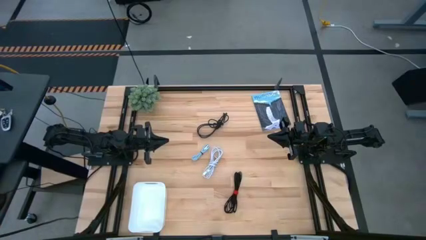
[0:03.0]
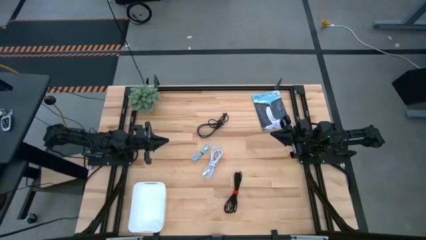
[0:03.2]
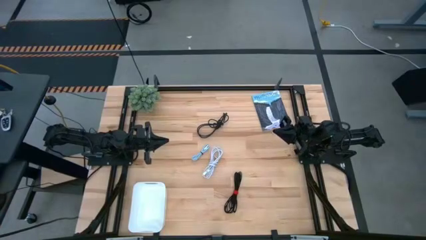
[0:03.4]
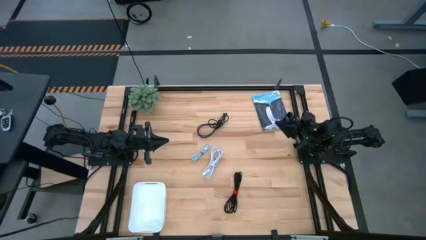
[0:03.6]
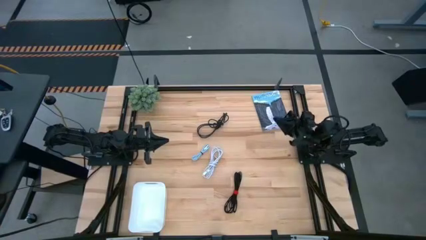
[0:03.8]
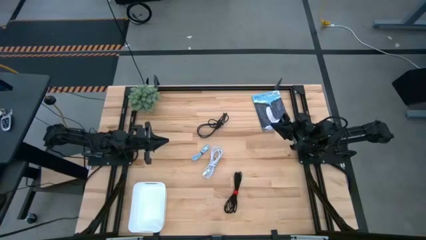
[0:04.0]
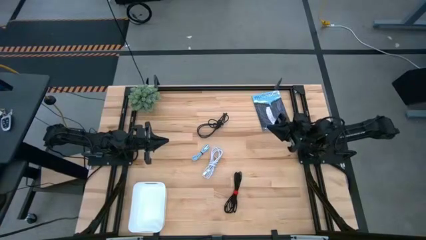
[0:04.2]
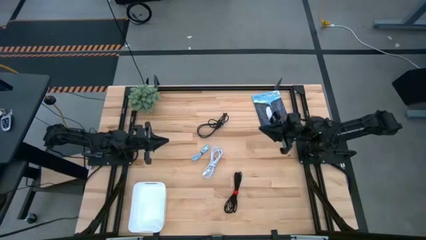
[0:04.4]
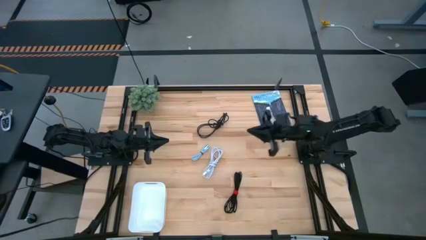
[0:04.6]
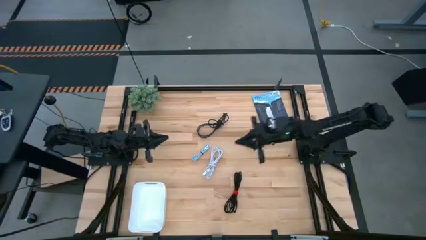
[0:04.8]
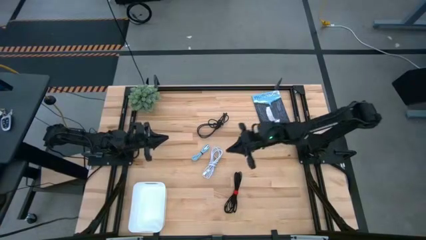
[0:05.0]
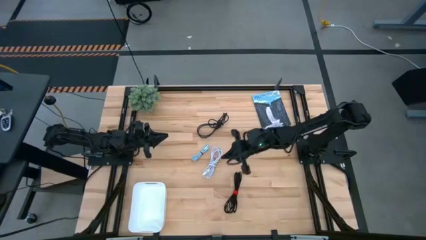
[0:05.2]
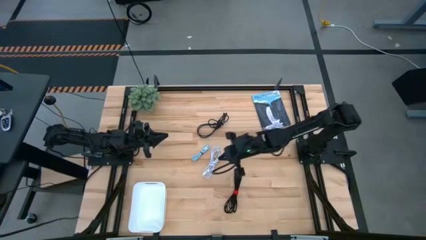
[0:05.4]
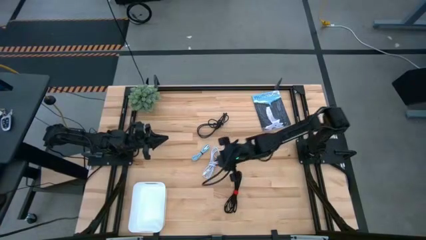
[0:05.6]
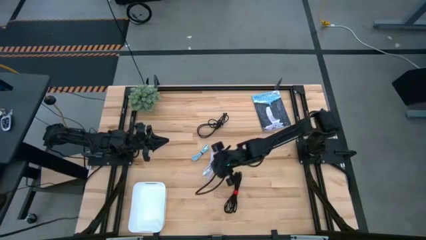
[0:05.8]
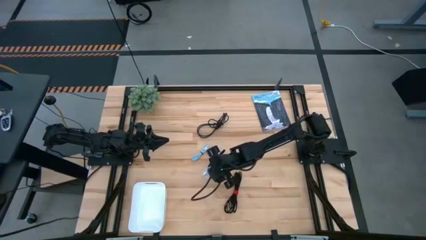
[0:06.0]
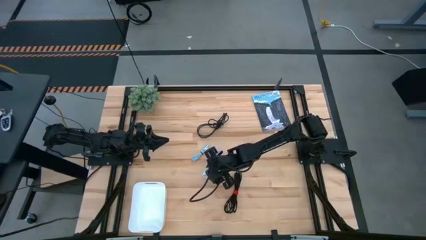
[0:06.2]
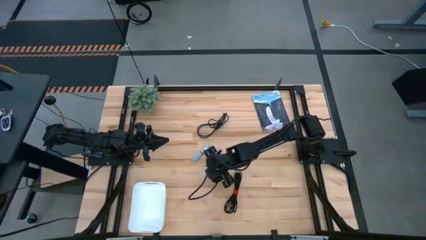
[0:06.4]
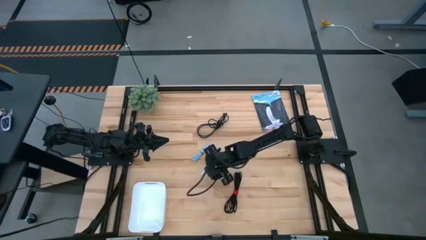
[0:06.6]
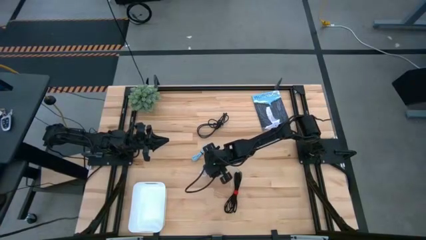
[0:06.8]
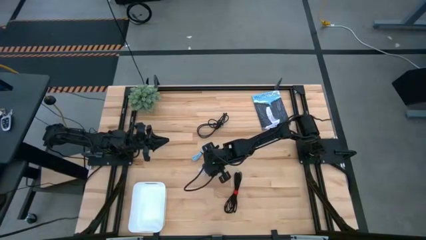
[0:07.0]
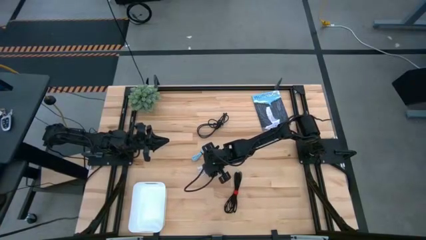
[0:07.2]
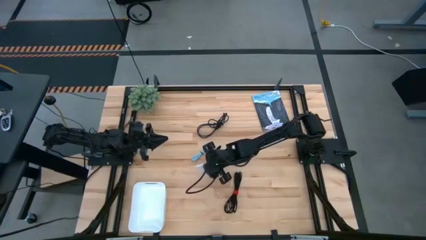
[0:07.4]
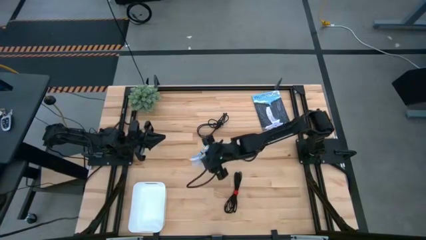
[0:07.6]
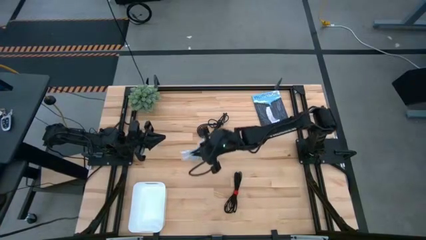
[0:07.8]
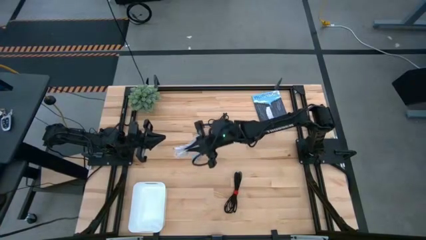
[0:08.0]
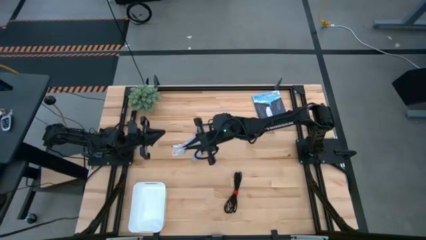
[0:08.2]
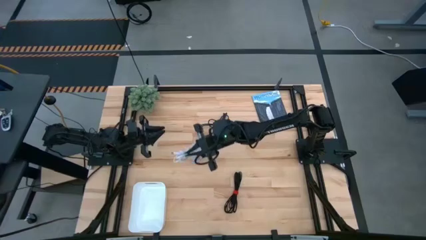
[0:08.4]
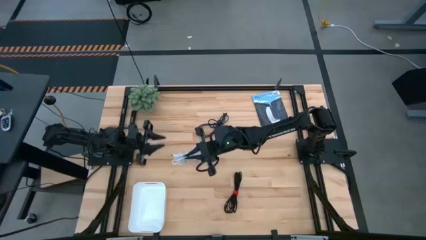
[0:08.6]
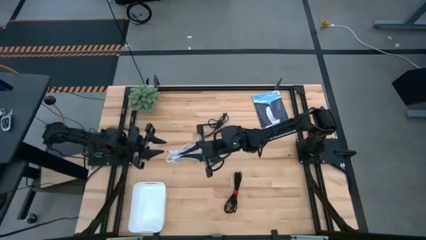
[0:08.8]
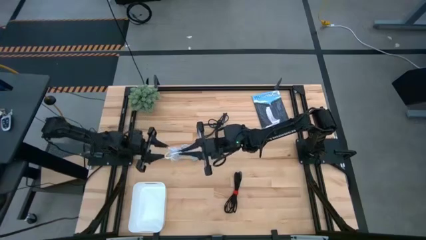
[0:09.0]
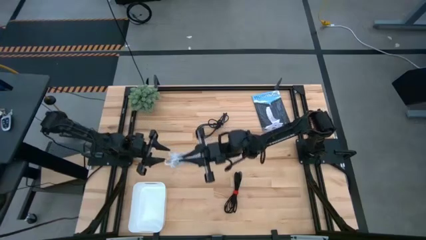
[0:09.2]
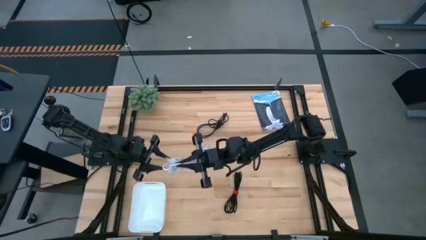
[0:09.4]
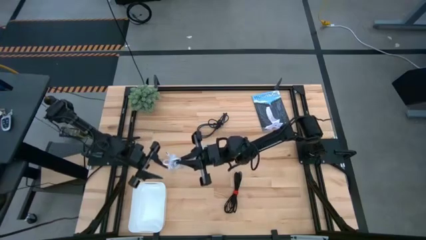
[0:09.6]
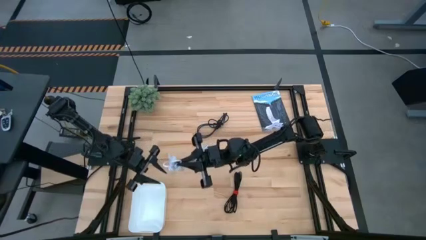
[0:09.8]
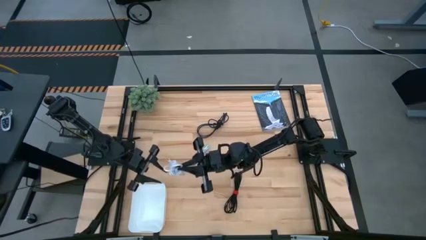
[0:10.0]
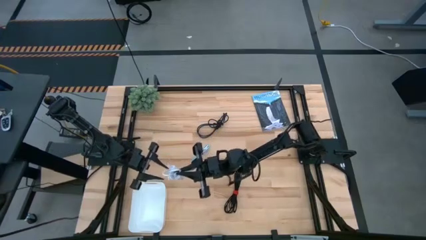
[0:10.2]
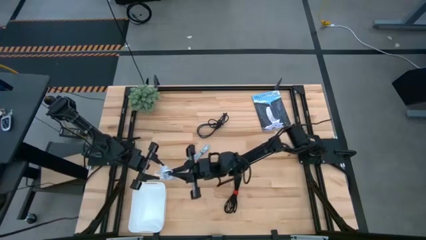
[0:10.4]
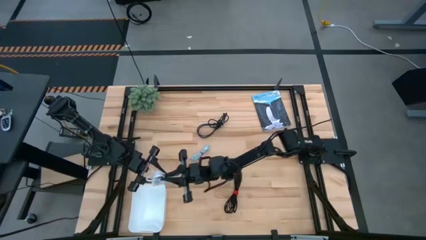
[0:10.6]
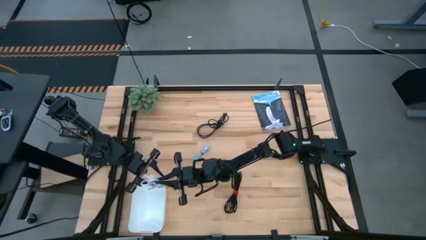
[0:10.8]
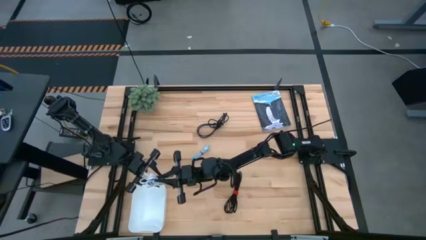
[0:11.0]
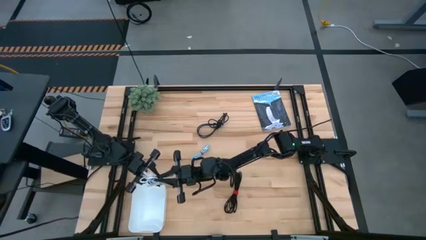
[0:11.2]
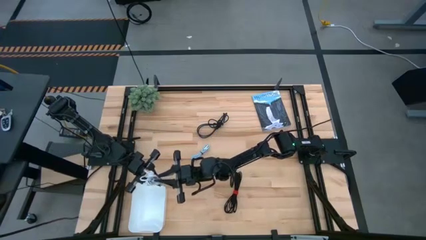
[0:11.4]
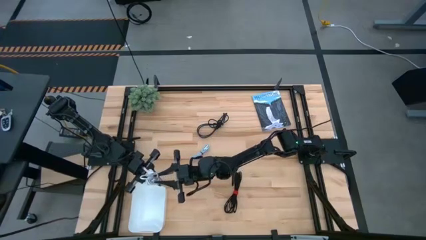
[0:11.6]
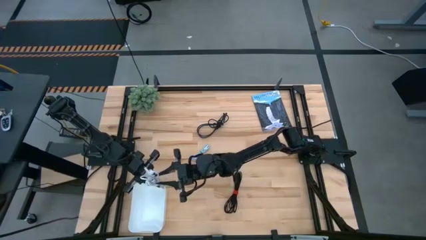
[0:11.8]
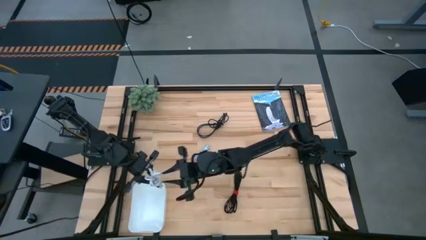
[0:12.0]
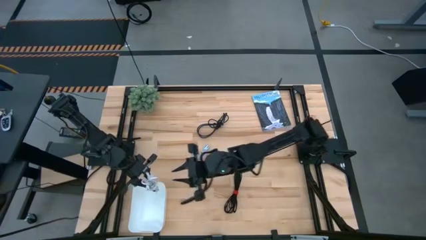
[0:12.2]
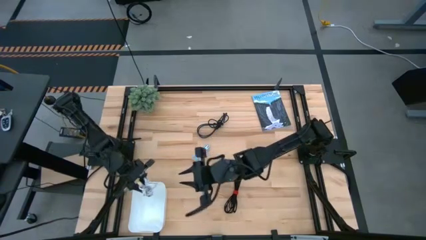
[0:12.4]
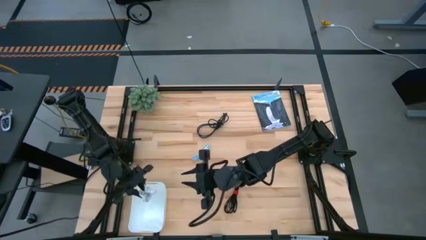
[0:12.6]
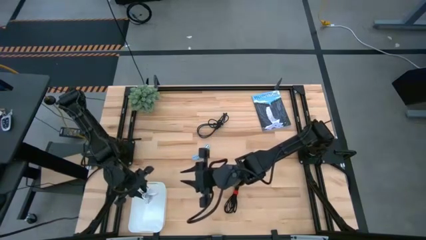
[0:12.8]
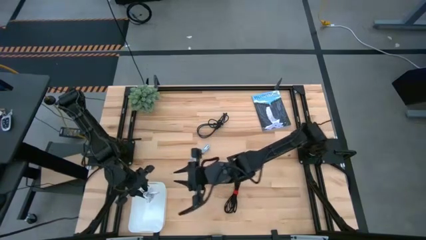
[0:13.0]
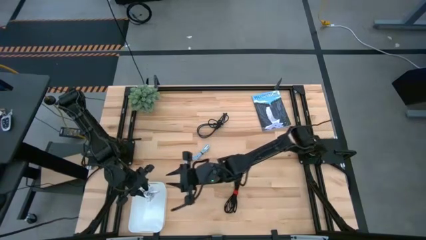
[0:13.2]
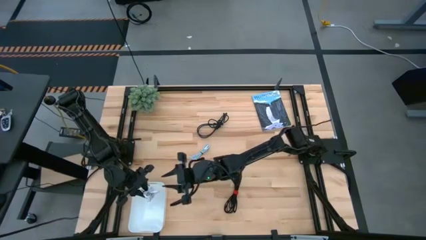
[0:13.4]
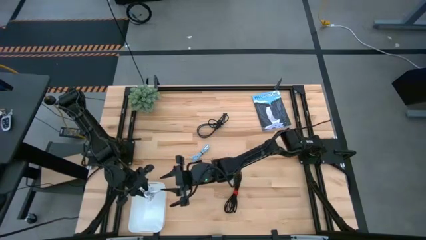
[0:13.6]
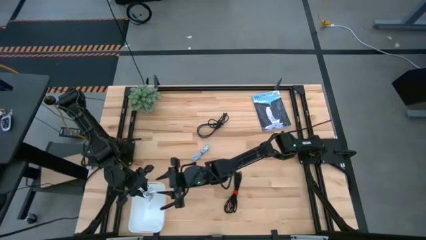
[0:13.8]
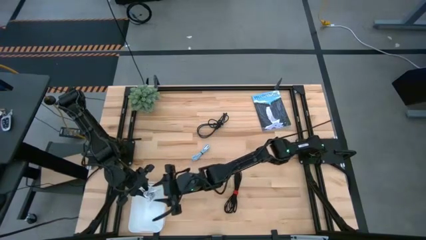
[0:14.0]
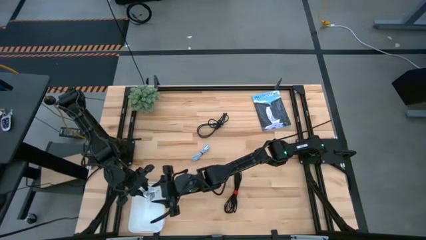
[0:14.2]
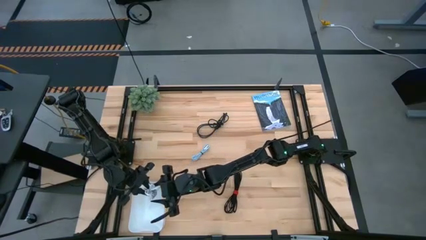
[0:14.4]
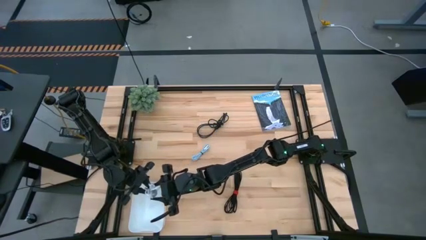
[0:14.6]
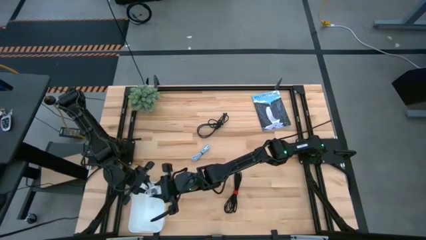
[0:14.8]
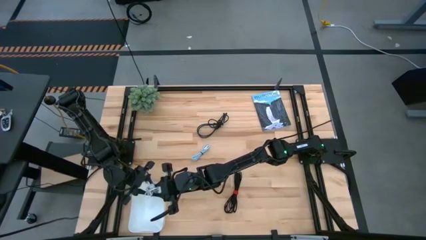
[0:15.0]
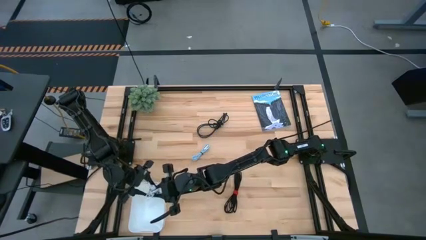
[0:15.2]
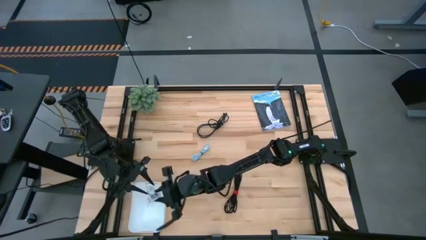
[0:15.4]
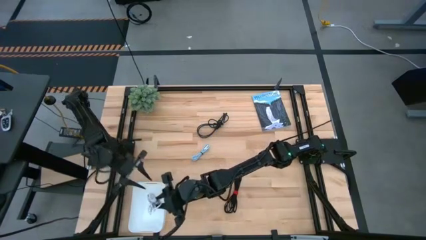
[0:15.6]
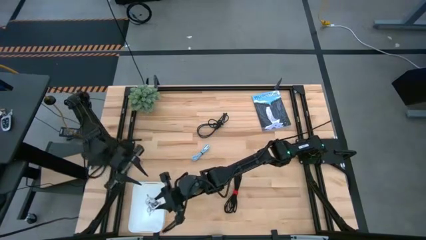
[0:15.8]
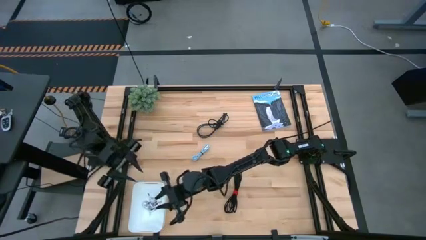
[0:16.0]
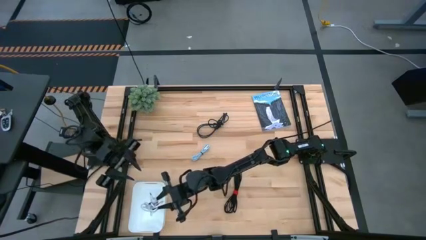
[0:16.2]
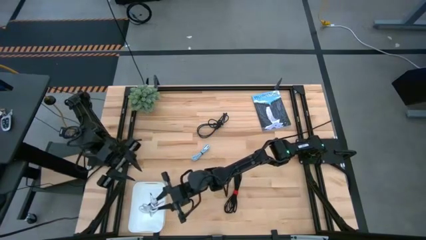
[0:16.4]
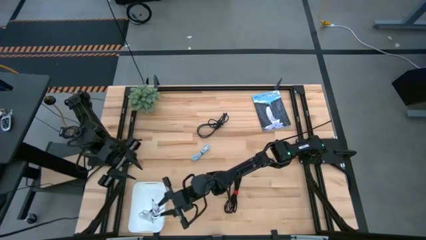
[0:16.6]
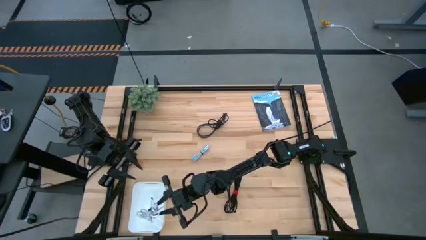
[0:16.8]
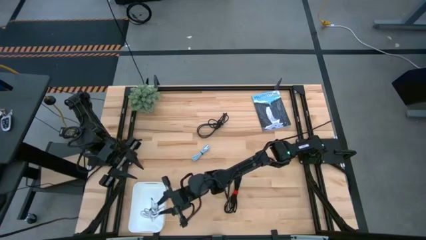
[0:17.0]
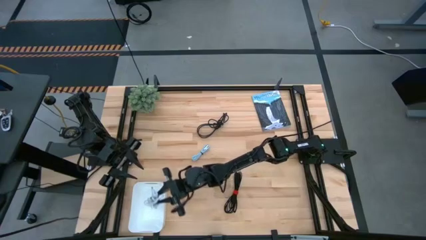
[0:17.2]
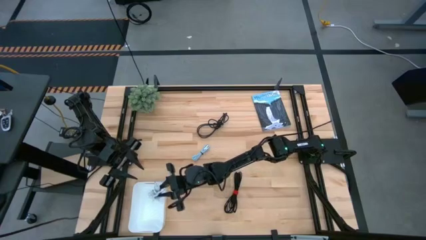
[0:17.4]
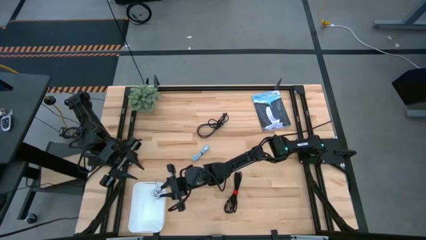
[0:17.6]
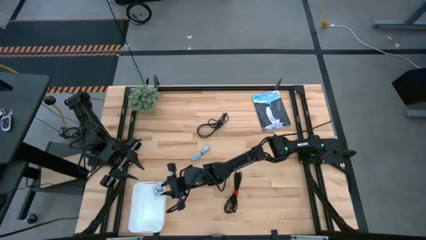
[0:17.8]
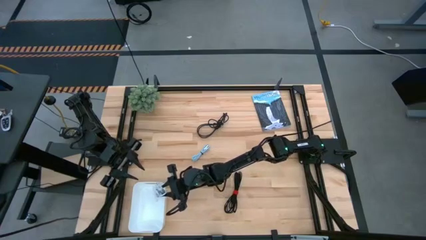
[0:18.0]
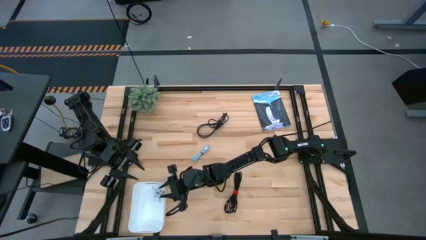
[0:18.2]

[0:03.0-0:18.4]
Task: Pick and place USB-C Cables
Put the white charger cable into the white bin
